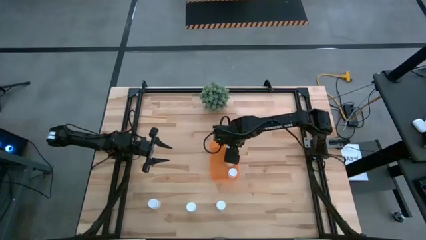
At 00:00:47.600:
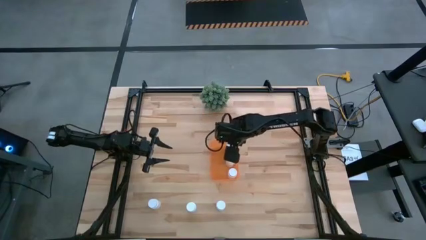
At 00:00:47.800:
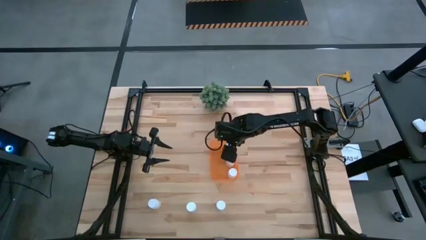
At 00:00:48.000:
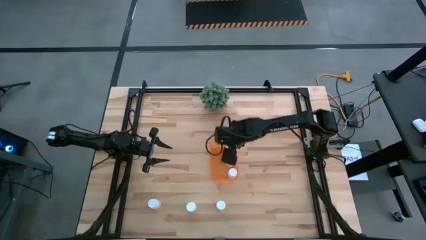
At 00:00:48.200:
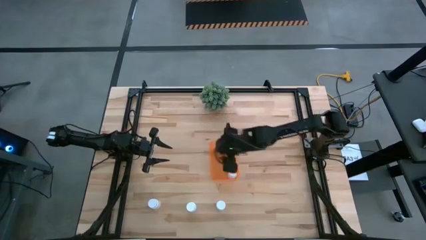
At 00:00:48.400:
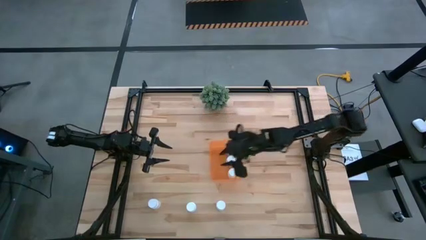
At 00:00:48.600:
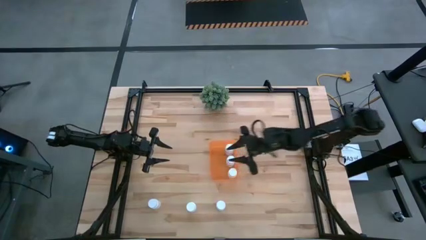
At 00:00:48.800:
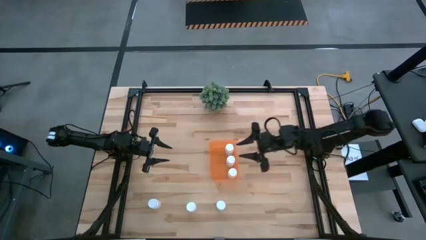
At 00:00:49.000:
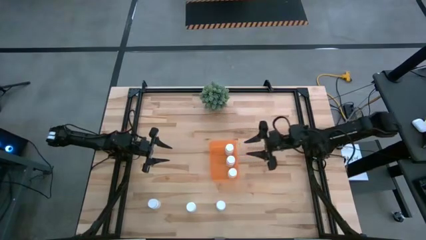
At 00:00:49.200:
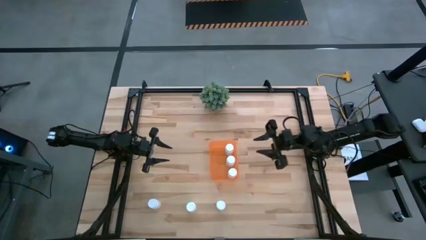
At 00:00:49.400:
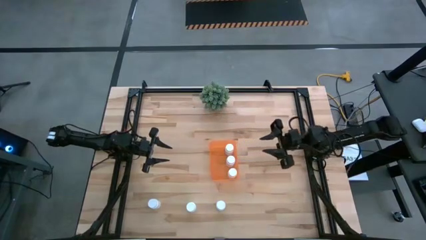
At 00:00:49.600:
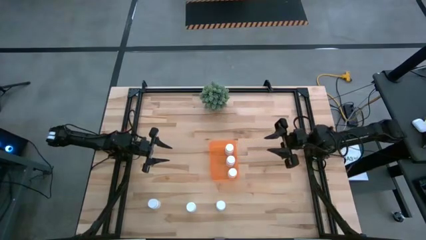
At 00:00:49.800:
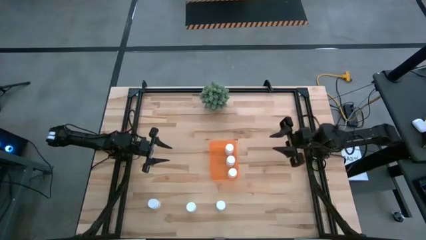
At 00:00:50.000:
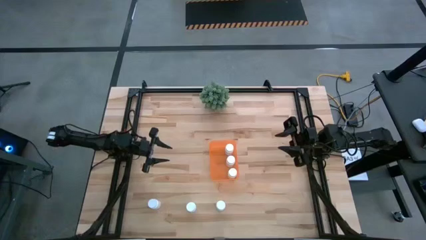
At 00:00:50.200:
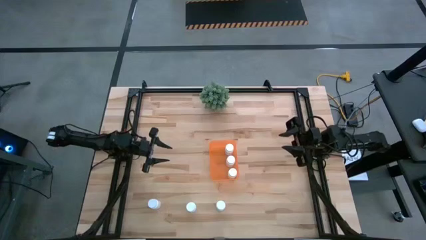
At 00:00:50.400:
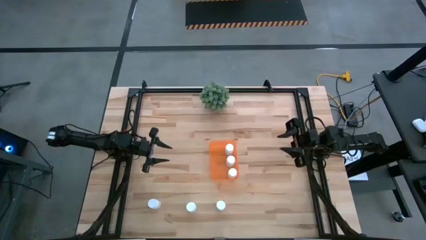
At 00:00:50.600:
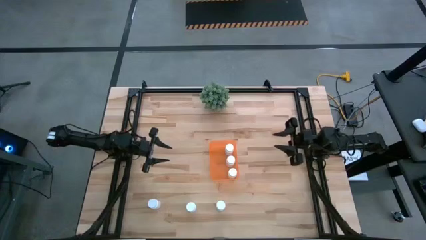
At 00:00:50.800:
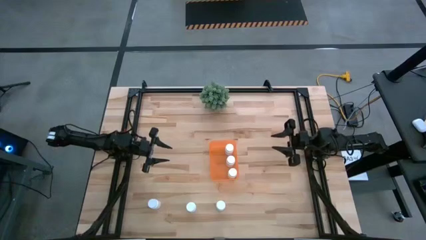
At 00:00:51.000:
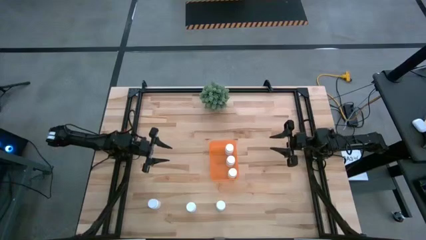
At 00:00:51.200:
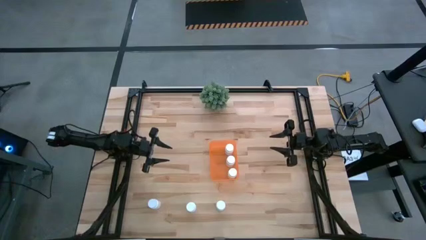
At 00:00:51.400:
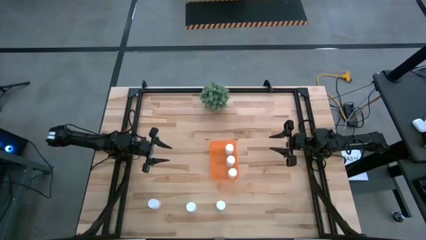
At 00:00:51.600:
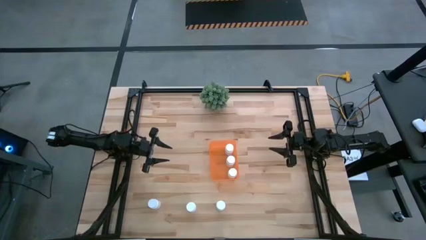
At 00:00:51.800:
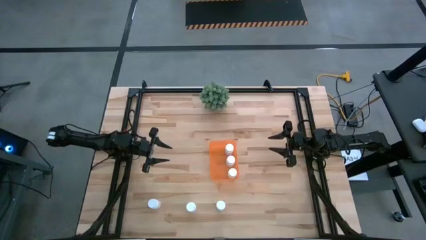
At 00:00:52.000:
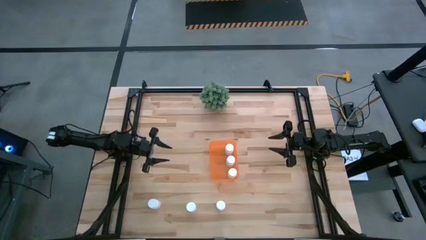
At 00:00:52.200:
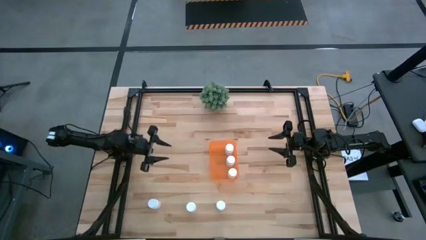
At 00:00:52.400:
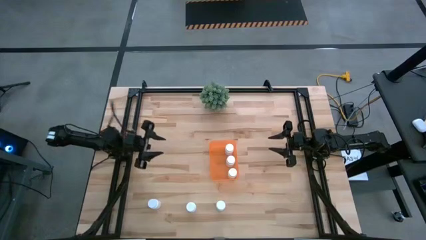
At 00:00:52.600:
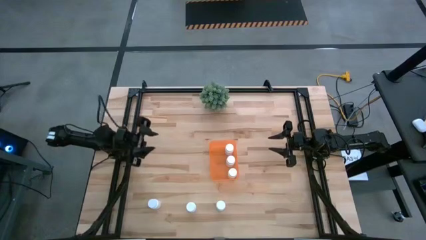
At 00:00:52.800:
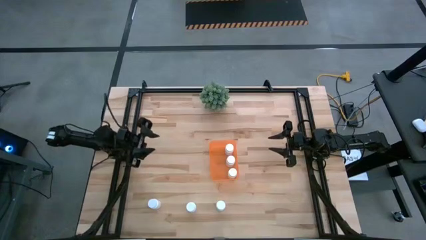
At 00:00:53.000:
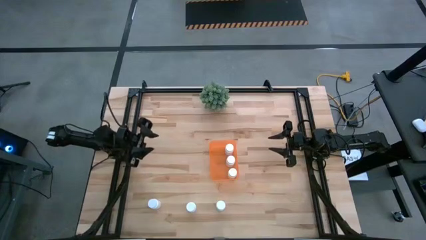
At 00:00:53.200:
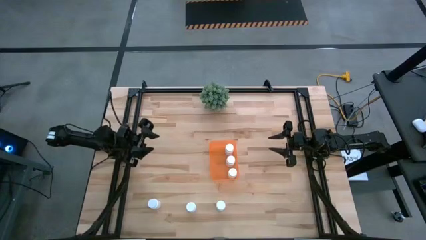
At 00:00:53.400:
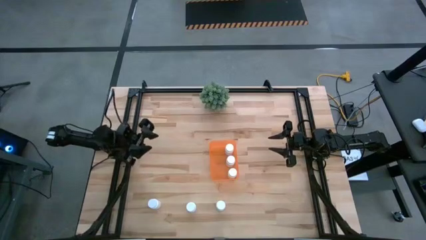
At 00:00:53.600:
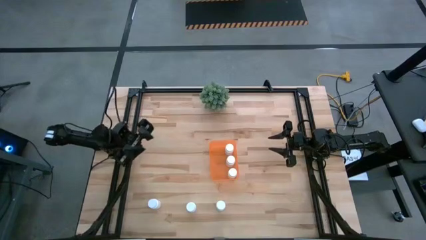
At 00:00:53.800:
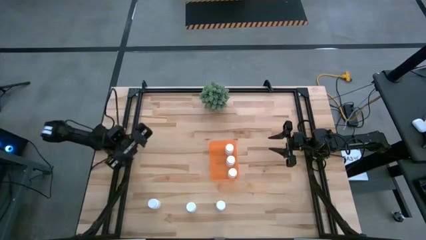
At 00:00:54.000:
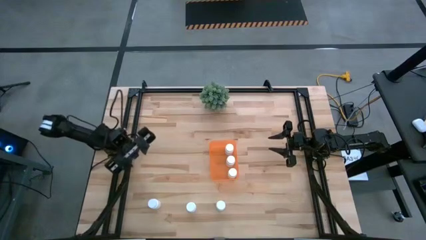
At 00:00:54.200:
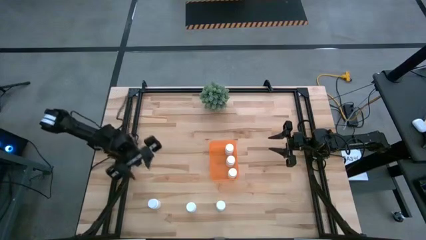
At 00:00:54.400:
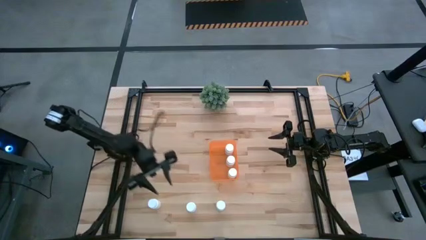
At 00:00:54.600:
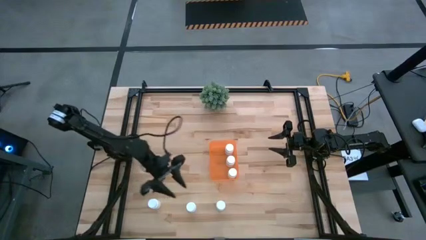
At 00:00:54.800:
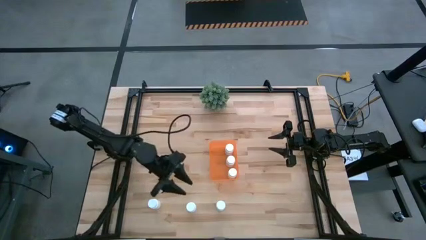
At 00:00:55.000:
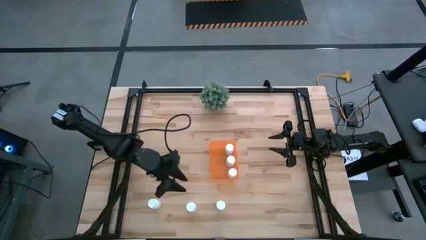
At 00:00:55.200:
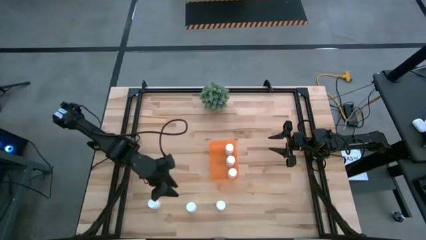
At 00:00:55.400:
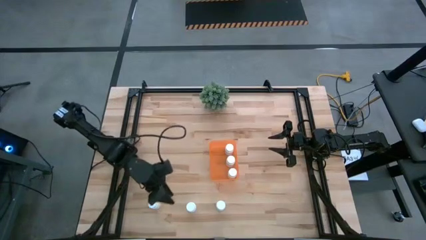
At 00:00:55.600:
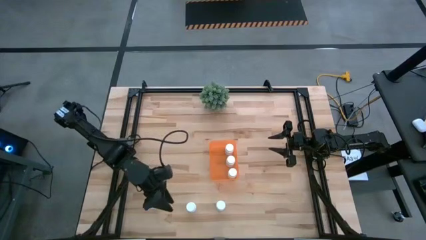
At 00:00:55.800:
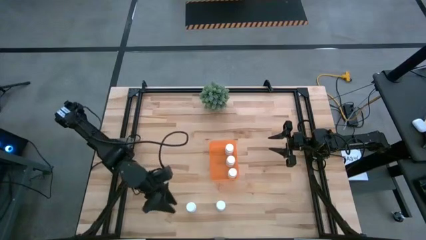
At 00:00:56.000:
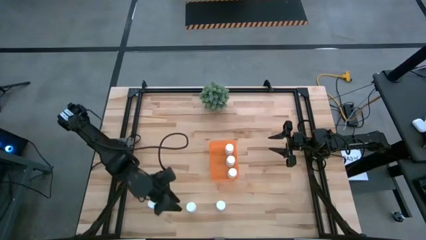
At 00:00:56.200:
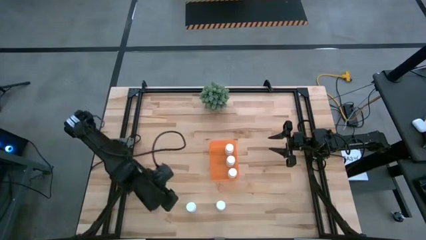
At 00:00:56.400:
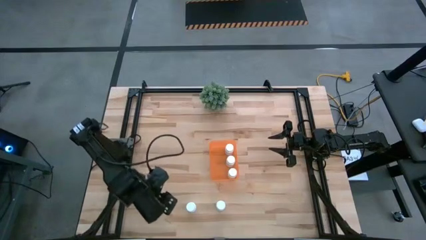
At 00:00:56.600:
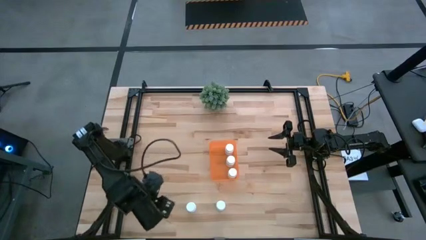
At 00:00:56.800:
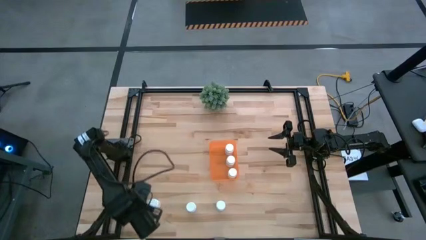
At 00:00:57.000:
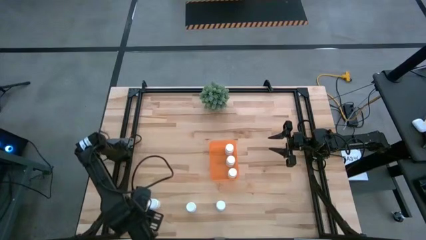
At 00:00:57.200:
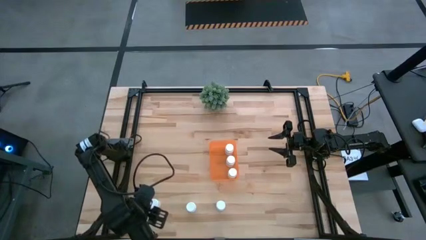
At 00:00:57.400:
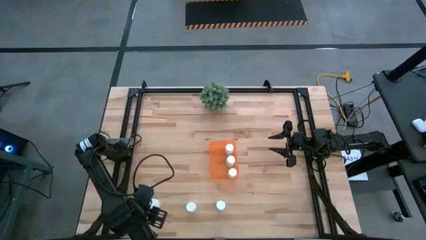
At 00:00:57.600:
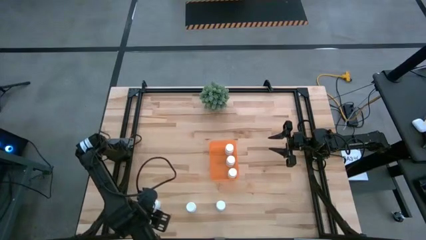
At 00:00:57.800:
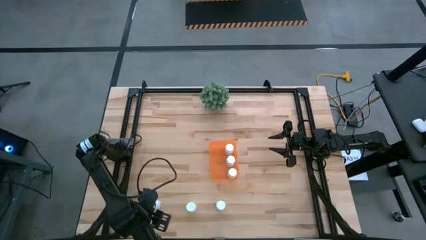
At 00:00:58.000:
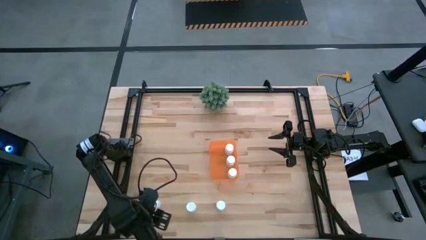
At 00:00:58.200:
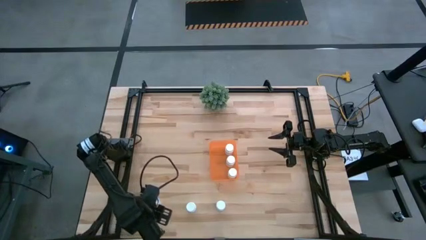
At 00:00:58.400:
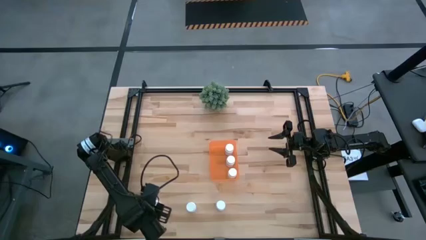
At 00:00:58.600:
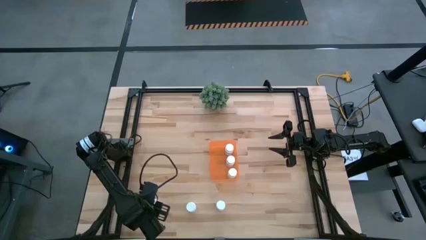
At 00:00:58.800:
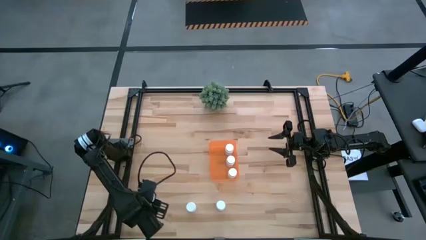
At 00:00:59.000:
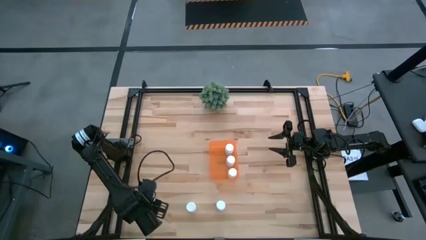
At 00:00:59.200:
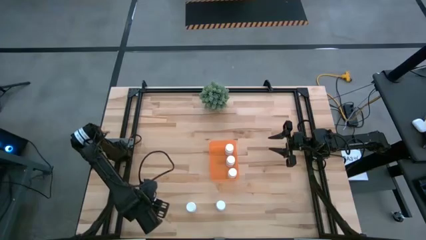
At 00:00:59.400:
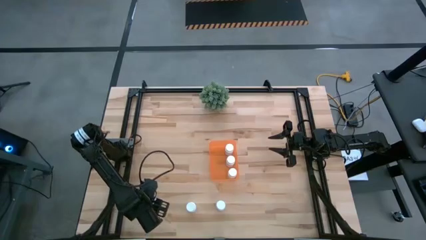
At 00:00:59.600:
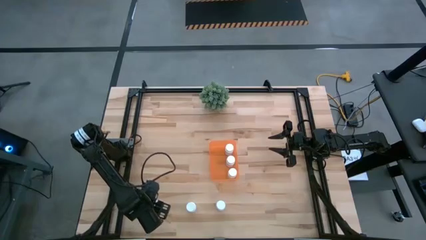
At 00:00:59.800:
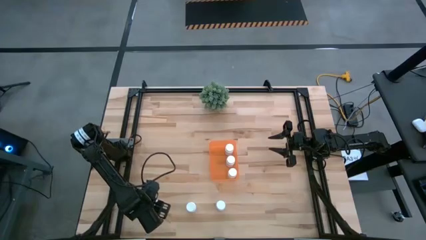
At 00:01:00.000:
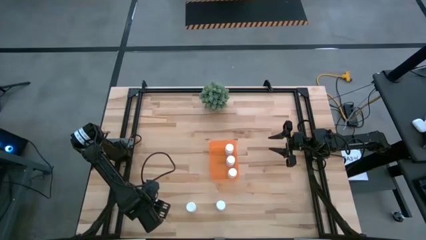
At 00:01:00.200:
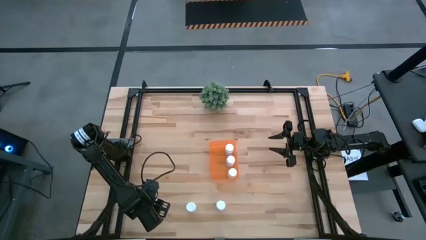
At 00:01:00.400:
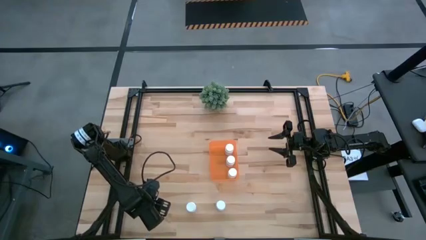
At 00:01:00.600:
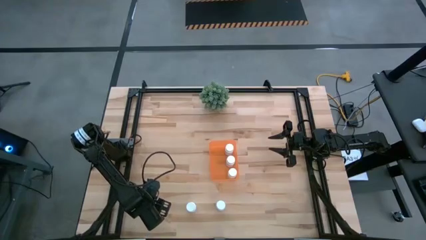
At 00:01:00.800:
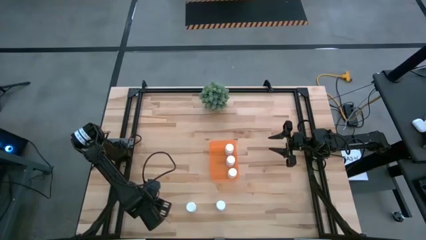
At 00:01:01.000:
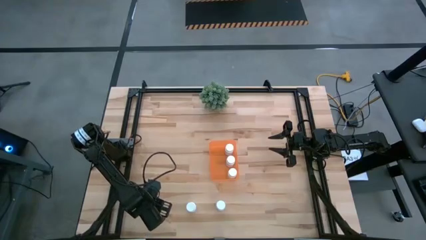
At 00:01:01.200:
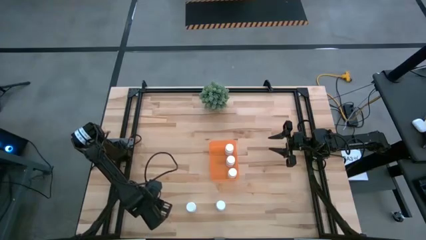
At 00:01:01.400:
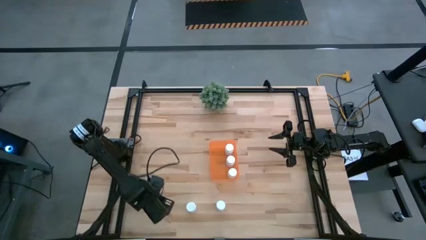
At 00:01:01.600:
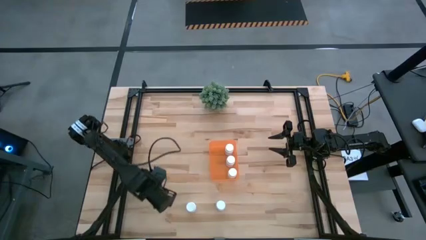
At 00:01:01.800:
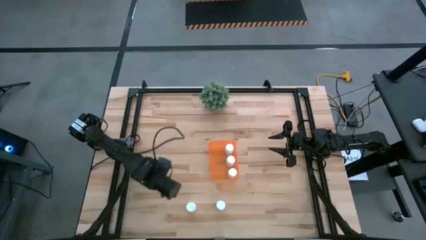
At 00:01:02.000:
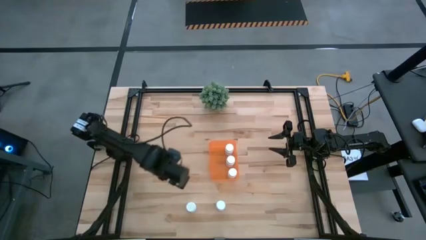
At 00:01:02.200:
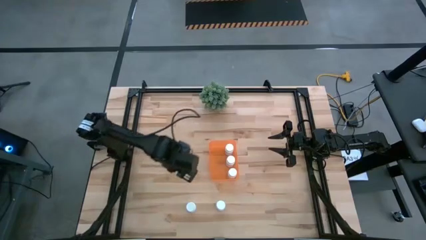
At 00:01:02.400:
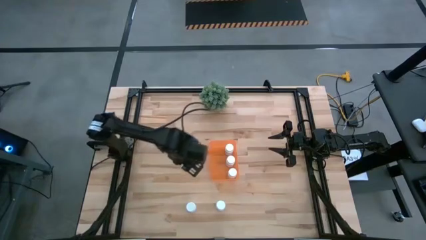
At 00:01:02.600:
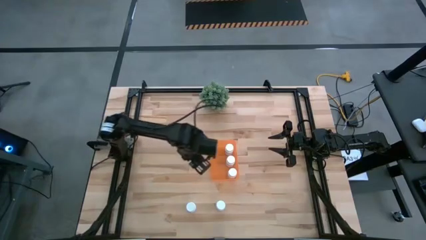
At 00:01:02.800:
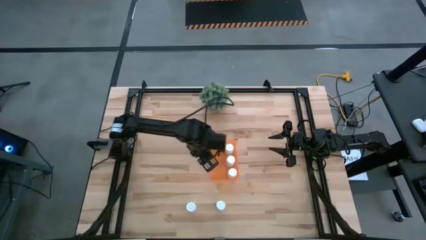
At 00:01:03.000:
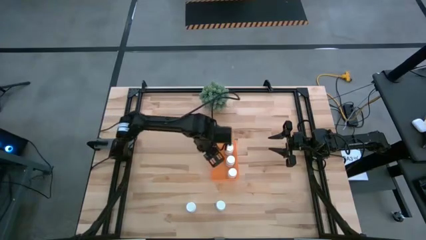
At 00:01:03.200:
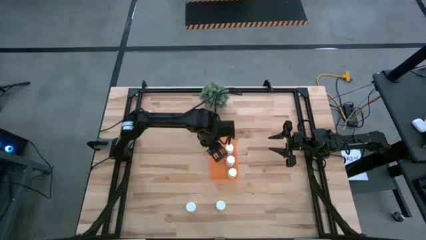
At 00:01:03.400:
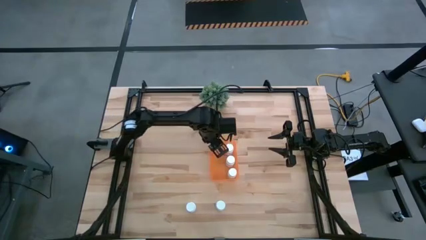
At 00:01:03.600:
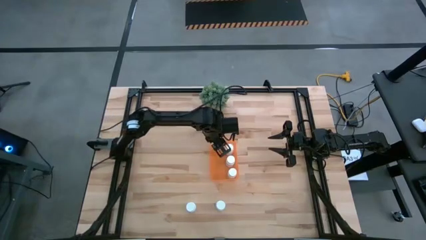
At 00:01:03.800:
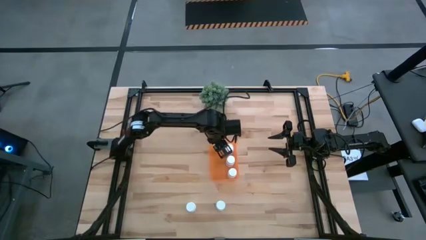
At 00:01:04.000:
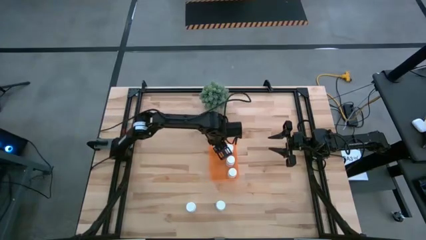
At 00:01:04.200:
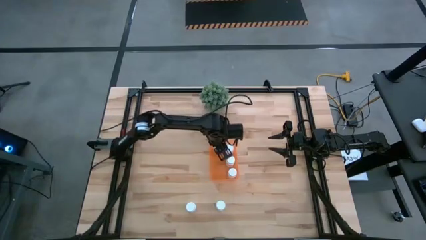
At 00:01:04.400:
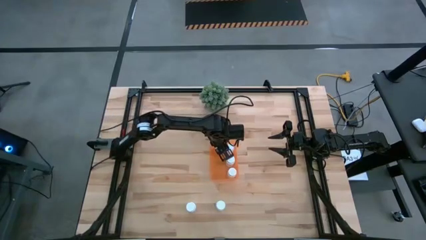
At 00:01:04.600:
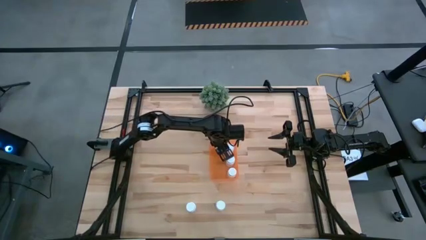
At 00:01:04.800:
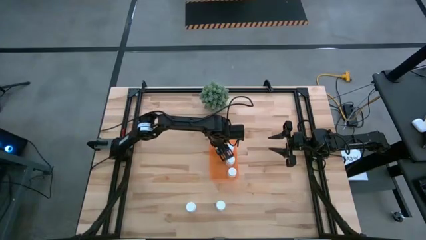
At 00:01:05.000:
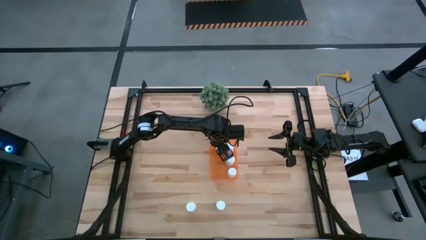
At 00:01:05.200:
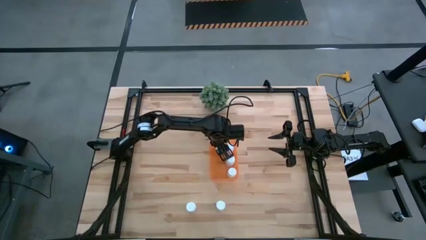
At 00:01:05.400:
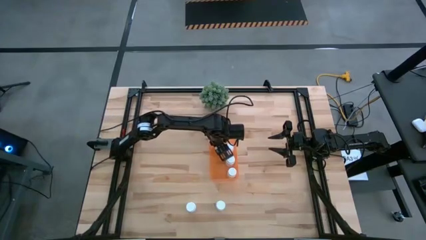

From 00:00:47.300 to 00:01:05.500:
Task: Pick and place pill bottles into a basket
Put the white pill bottle into the orange bin
